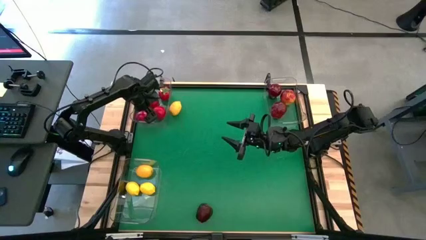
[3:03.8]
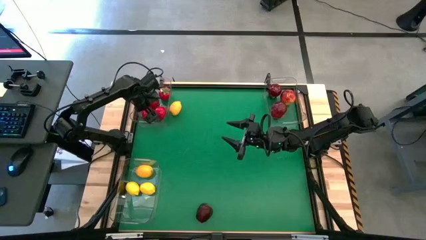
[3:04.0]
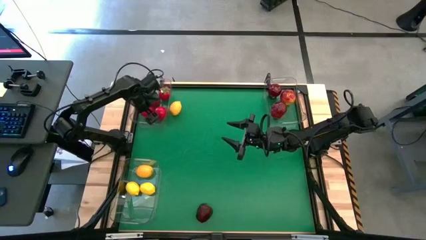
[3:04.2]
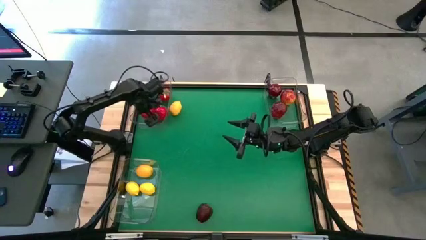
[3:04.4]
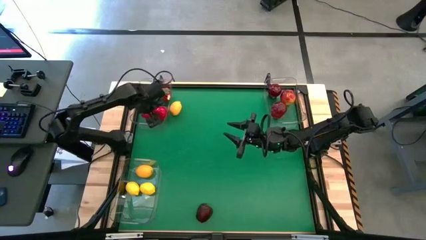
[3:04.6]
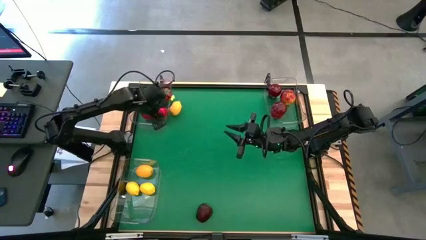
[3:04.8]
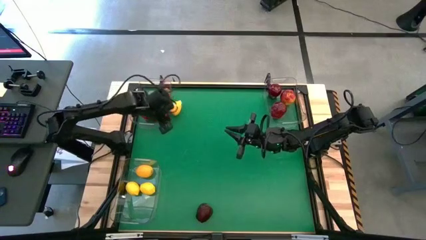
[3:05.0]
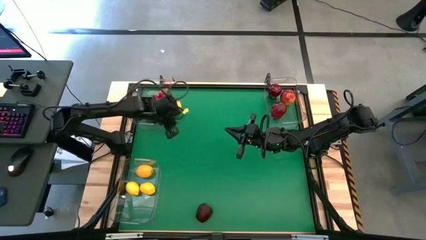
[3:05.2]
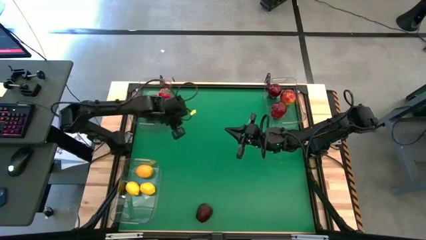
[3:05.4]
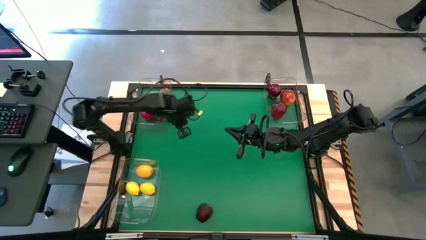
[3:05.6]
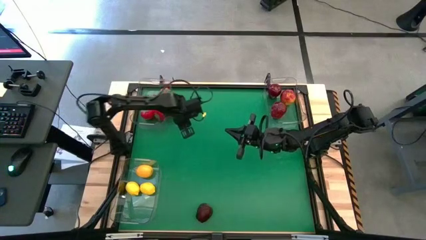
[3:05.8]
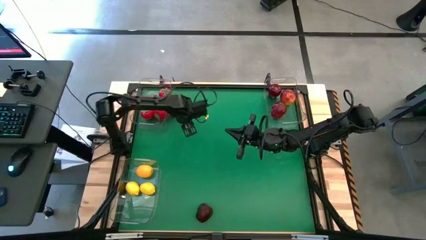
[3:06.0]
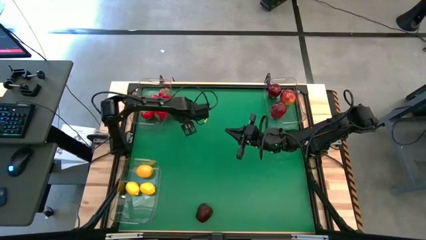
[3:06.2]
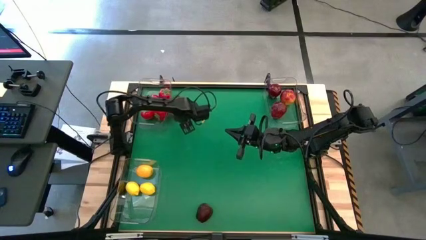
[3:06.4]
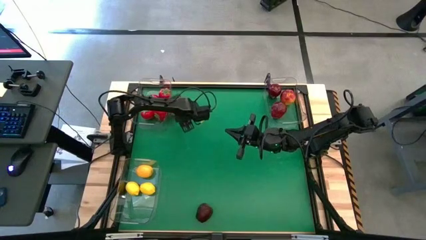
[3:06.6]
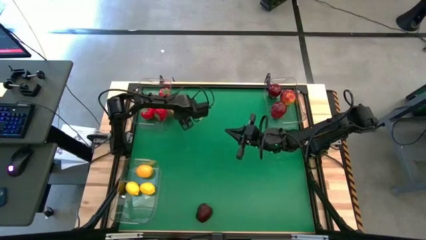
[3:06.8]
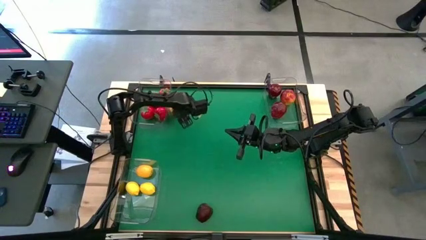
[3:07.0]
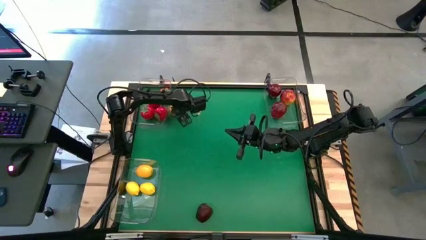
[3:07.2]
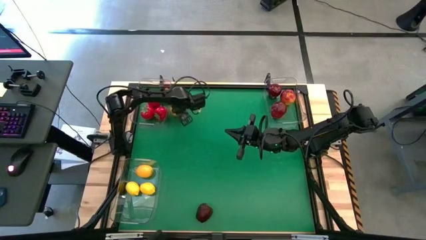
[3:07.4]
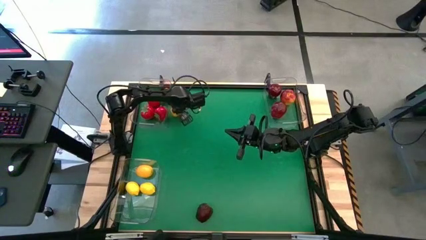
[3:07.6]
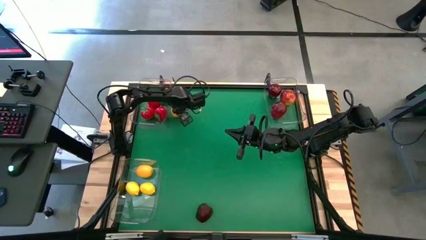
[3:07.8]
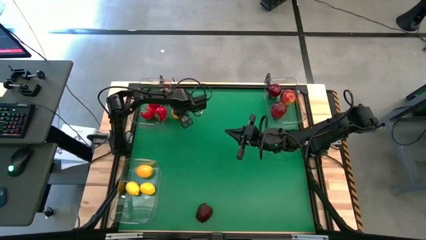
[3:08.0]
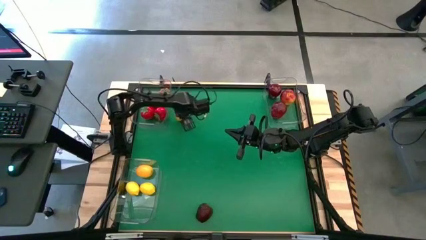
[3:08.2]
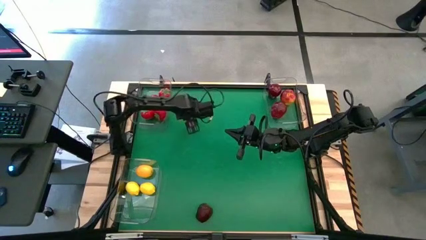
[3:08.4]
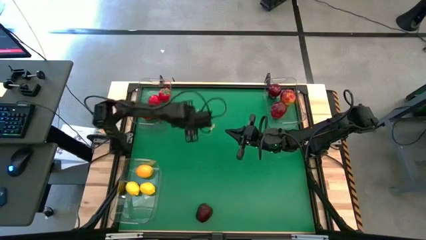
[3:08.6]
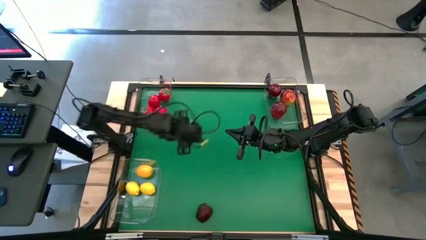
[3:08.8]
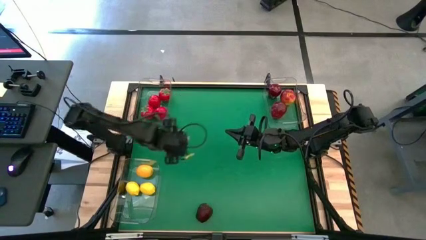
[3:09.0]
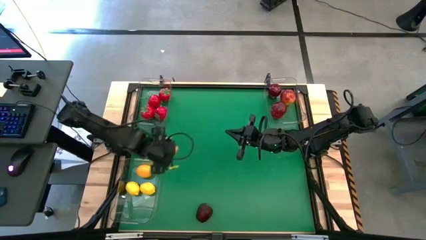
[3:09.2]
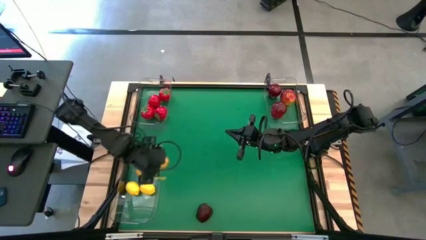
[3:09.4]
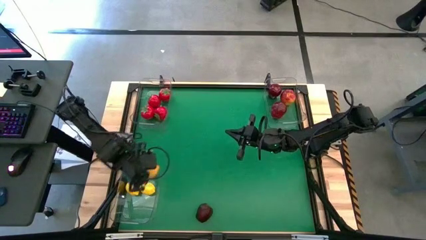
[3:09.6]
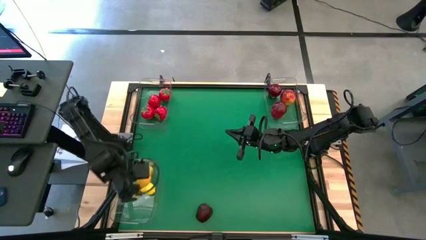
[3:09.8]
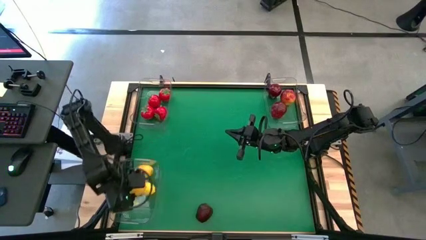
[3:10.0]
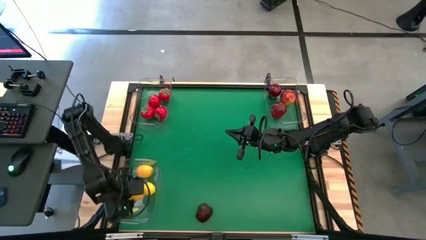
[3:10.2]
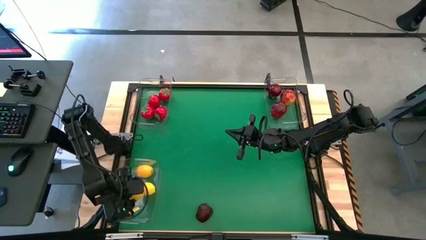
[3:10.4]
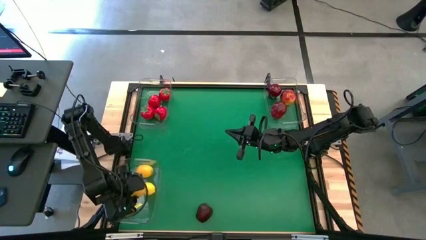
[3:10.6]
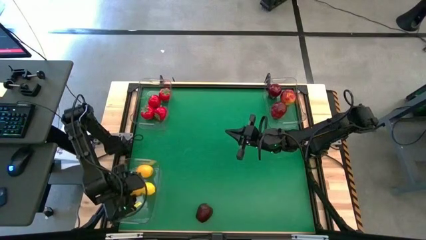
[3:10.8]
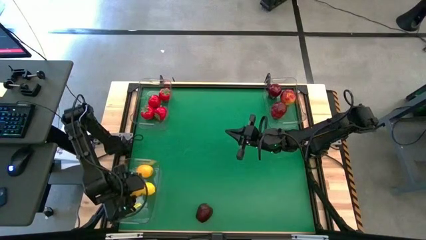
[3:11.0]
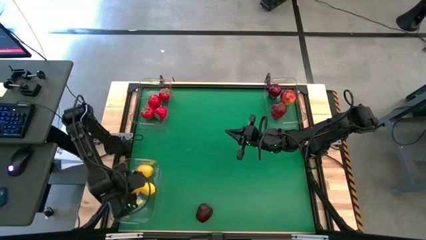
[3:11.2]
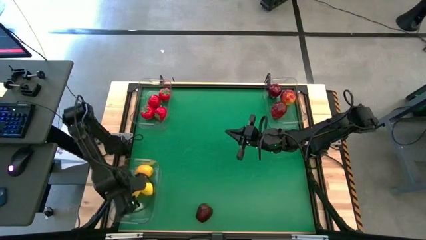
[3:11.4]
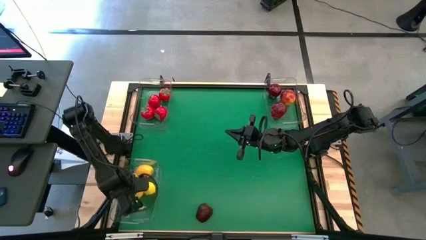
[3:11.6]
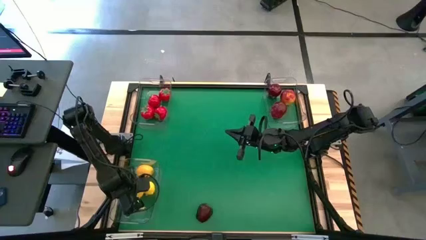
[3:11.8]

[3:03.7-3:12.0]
Task: Sort produce into baskets
Put the lemon into the bottom bin

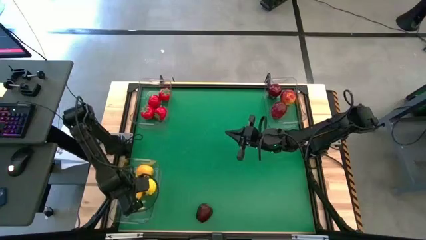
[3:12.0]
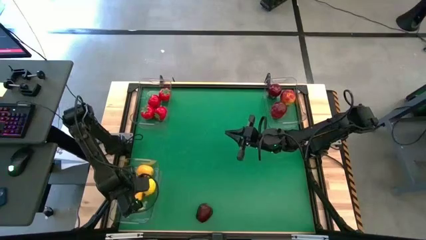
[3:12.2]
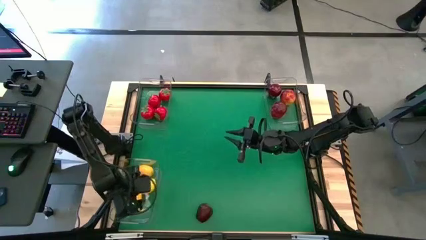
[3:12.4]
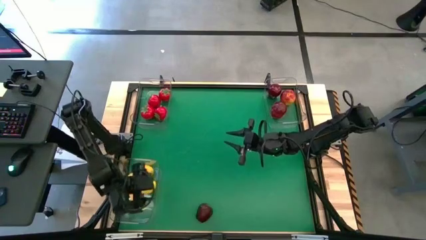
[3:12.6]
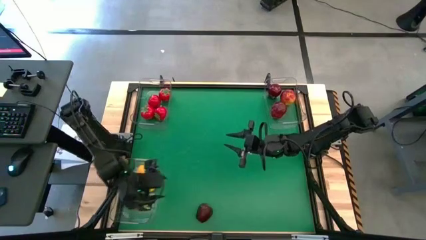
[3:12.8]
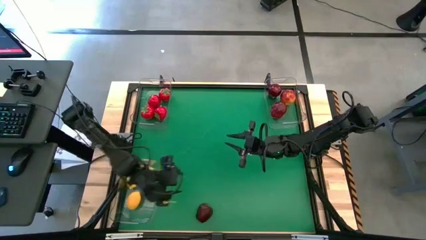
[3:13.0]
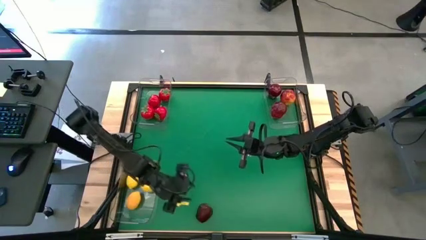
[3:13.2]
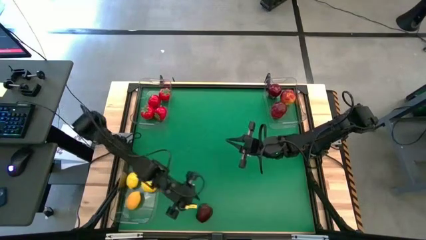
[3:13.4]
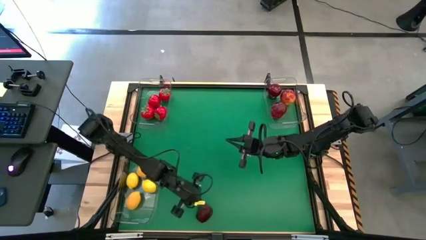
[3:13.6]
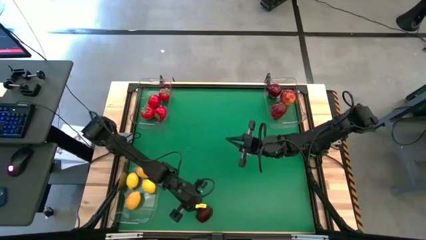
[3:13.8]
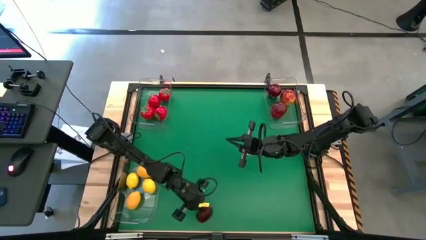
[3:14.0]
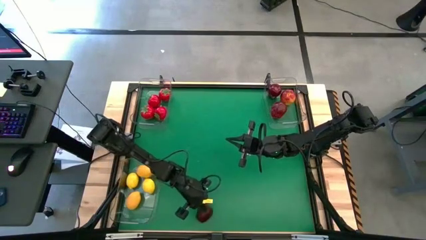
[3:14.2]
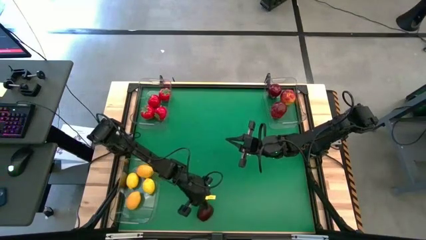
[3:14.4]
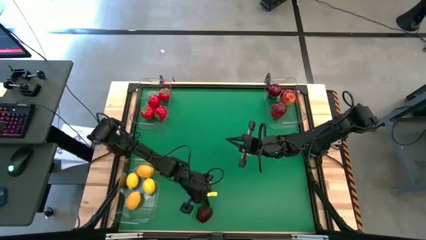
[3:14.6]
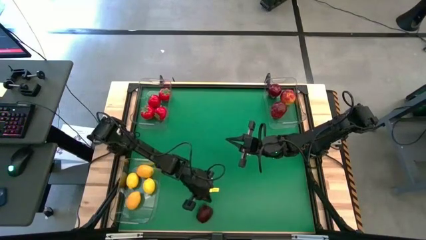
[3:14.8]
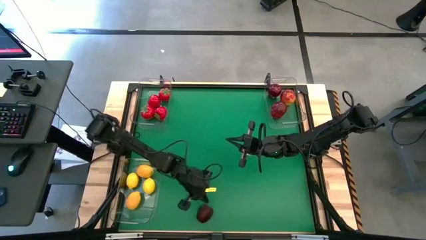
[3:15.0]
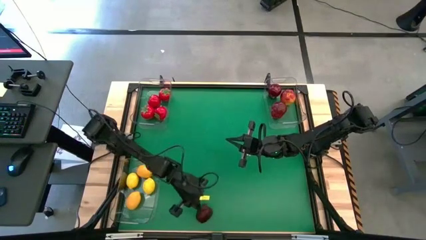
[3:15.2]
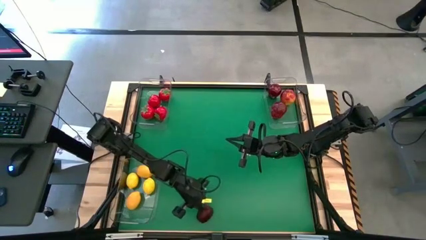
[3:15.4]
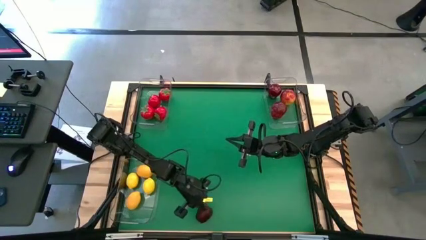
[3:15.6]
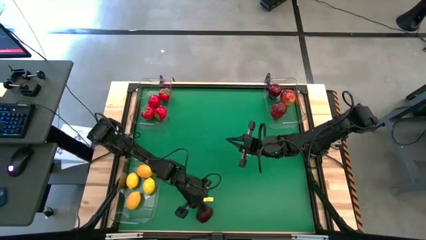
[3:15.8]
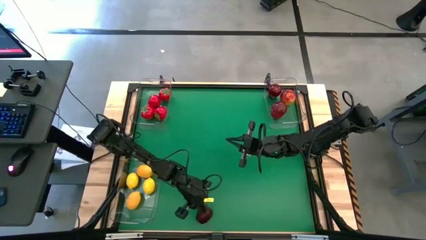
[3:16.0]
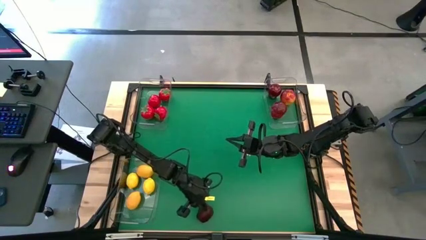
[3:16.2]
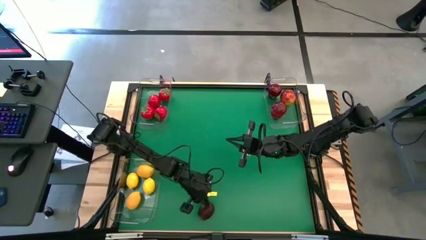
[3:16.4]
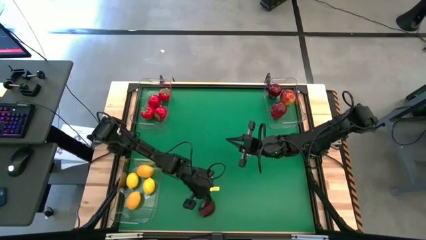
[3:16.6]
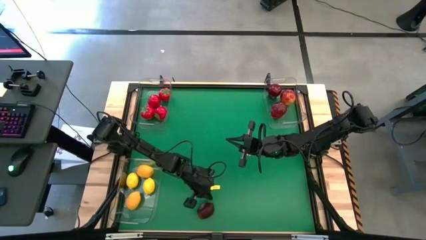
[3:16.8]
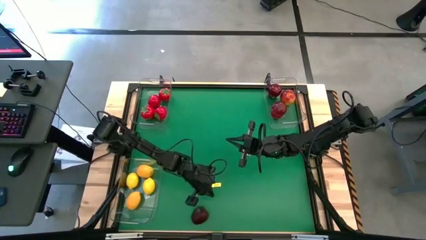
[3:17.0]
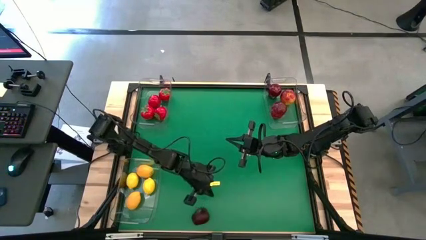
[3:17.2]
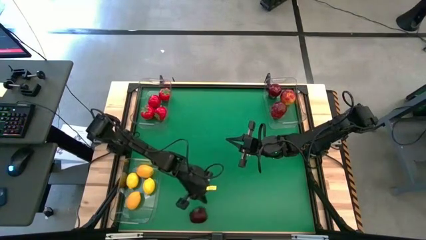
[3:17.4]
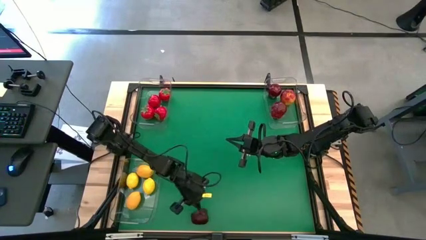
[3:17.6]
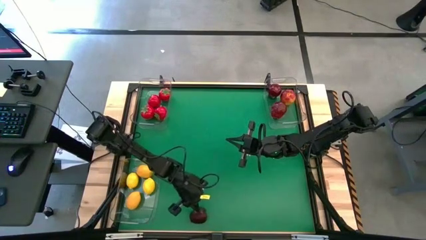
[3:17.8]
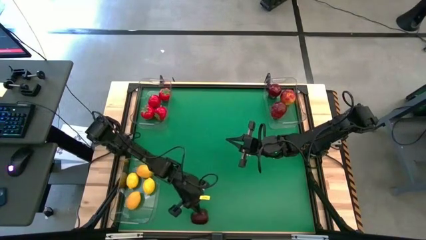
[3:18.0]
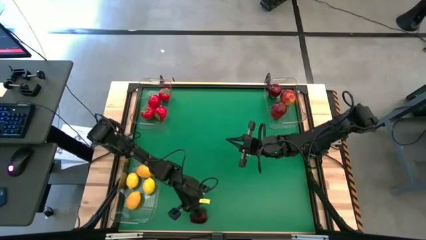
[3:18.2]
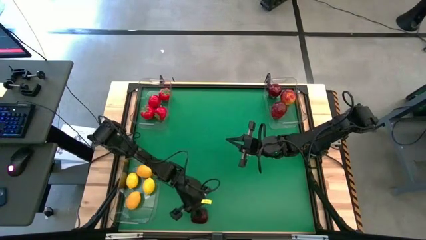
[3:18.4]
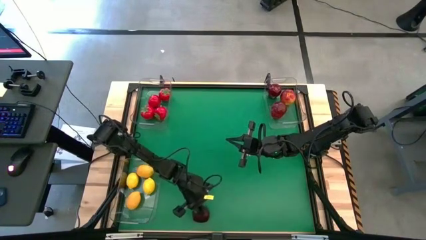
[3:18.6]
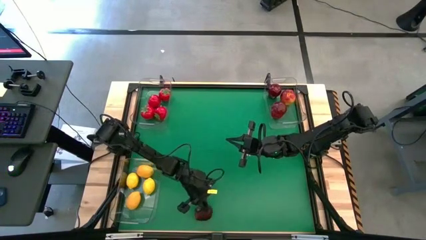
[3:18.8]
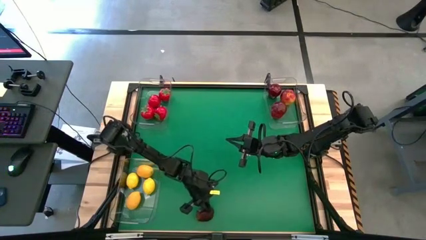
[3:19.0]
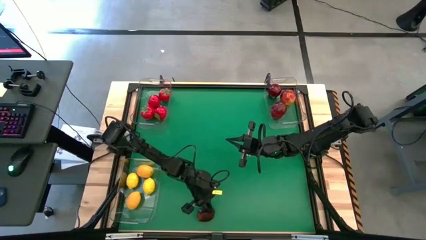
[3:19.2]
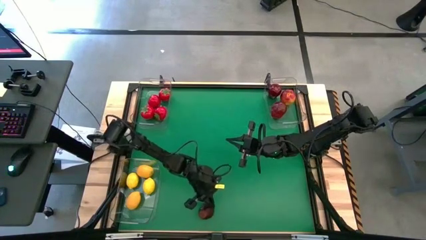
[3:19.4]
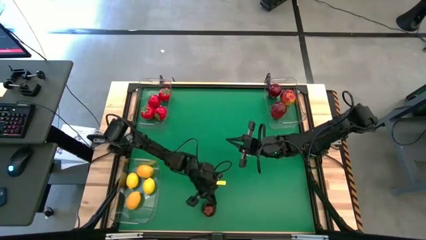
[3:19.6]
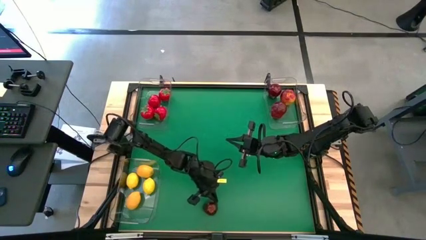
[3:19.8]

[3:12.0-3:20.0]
Put the apple into the top right bin
